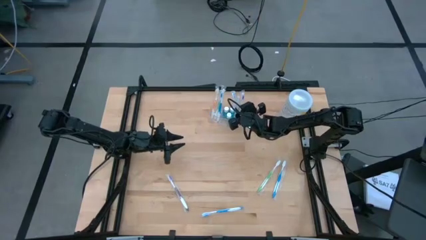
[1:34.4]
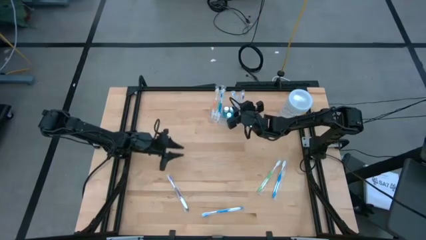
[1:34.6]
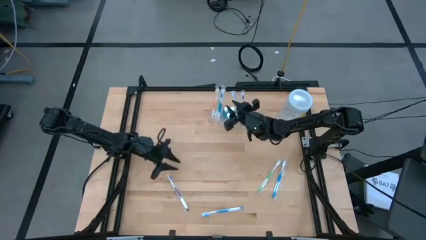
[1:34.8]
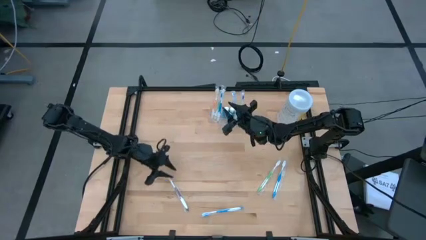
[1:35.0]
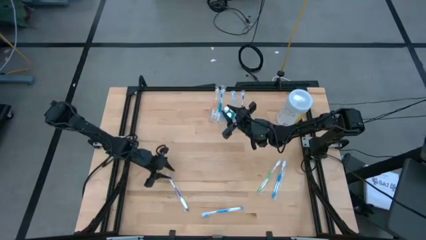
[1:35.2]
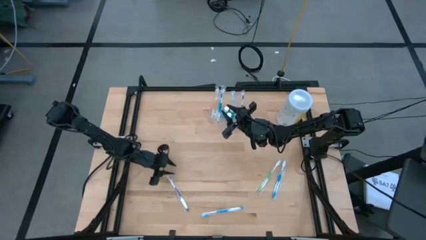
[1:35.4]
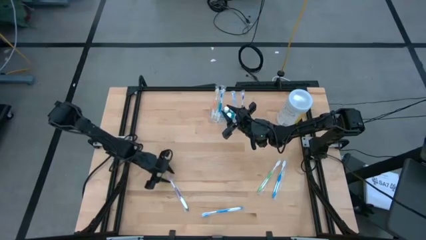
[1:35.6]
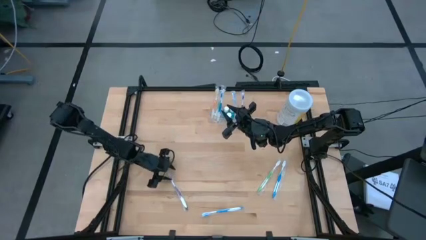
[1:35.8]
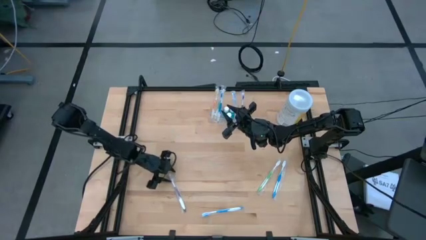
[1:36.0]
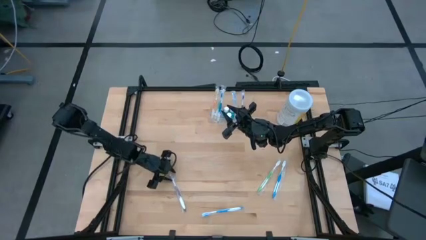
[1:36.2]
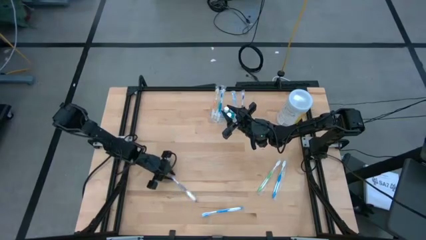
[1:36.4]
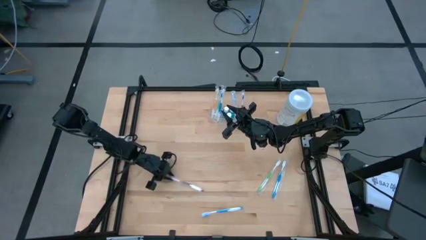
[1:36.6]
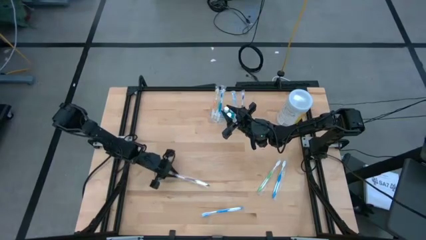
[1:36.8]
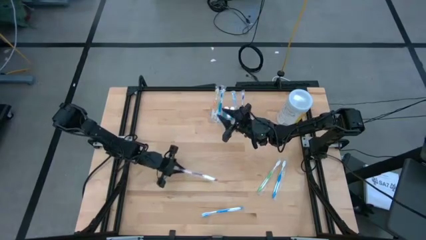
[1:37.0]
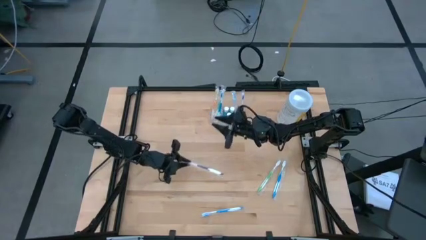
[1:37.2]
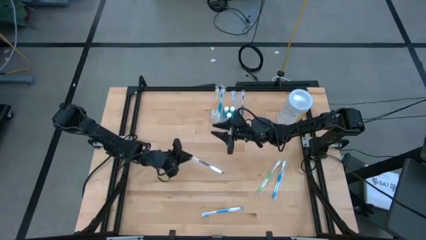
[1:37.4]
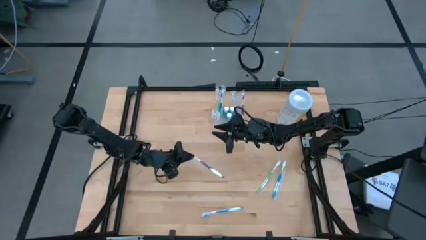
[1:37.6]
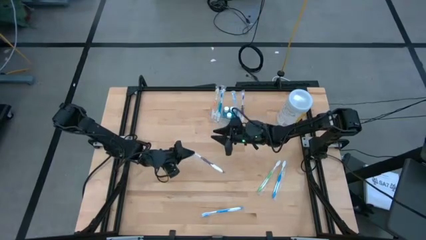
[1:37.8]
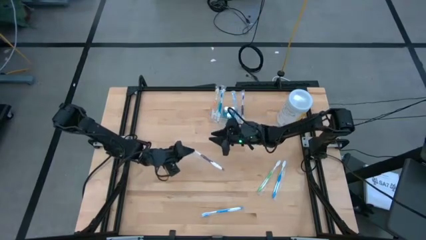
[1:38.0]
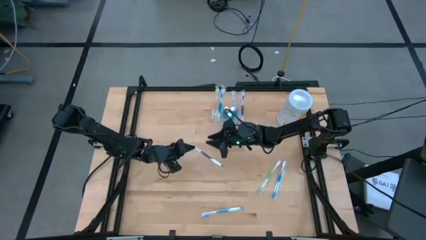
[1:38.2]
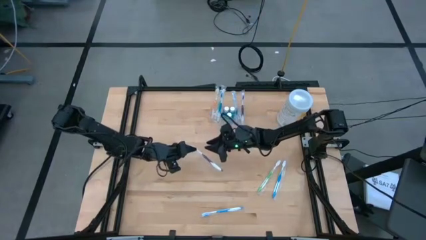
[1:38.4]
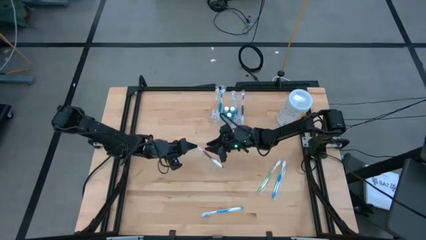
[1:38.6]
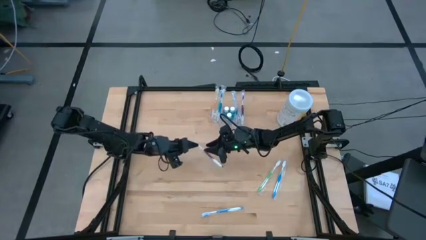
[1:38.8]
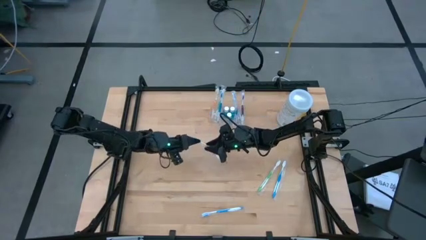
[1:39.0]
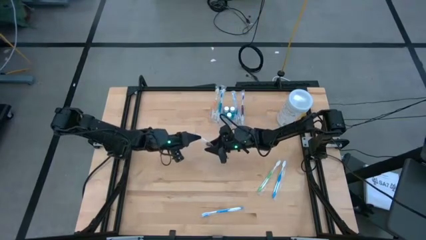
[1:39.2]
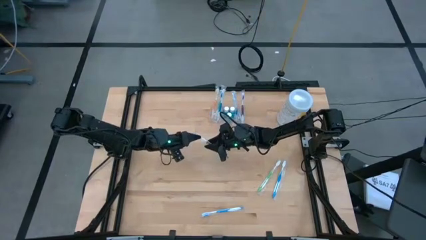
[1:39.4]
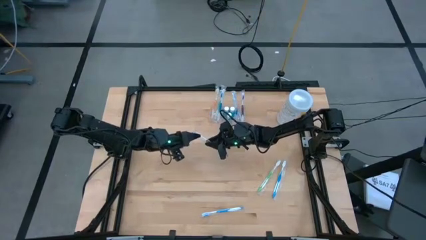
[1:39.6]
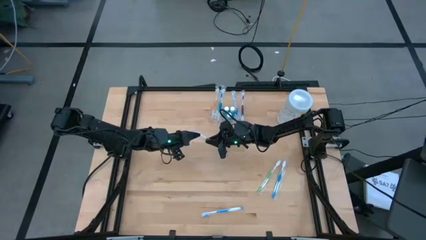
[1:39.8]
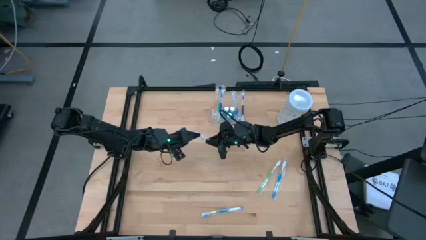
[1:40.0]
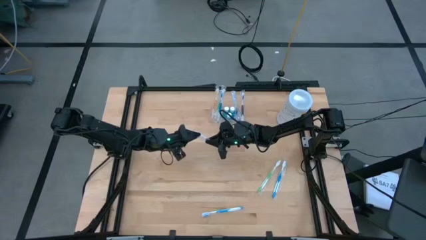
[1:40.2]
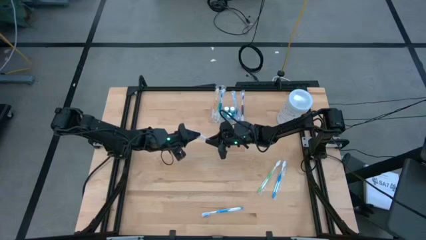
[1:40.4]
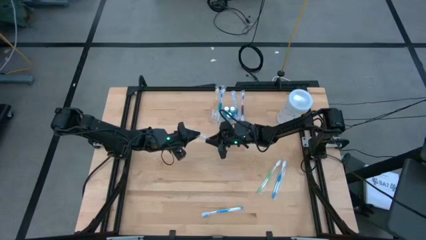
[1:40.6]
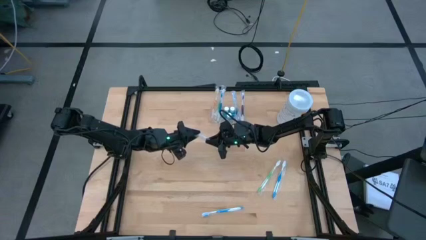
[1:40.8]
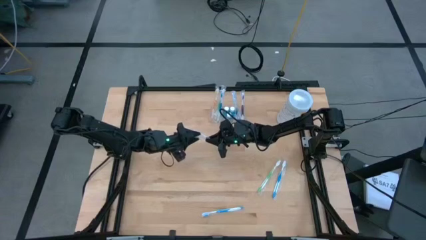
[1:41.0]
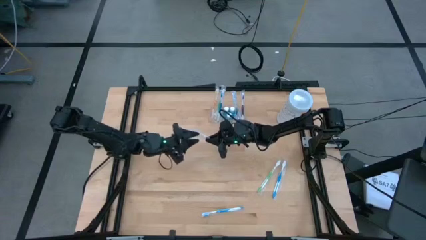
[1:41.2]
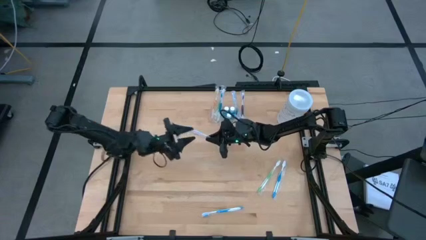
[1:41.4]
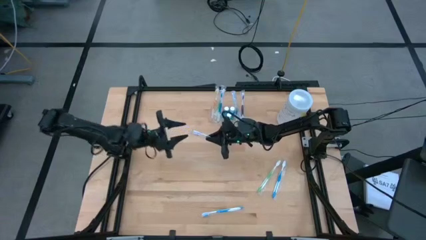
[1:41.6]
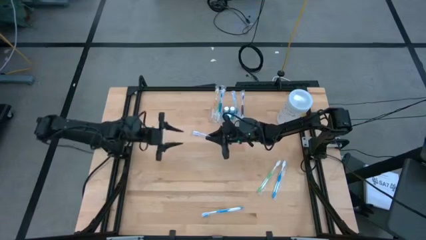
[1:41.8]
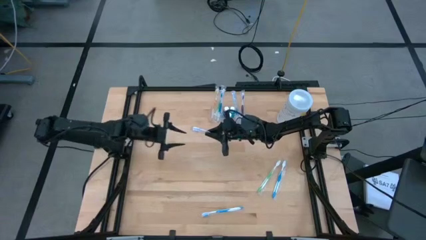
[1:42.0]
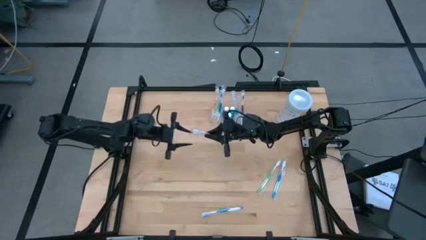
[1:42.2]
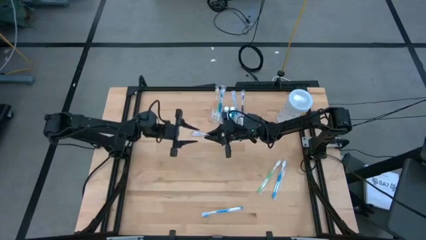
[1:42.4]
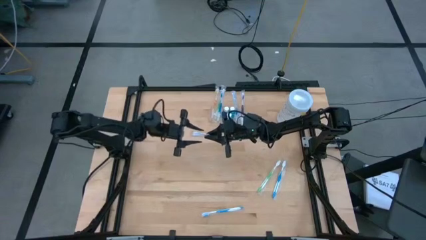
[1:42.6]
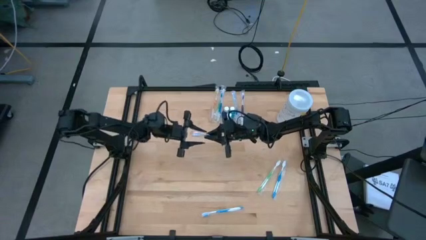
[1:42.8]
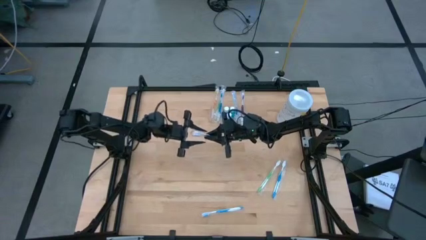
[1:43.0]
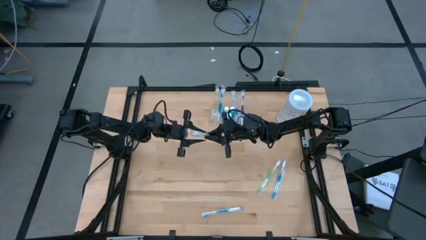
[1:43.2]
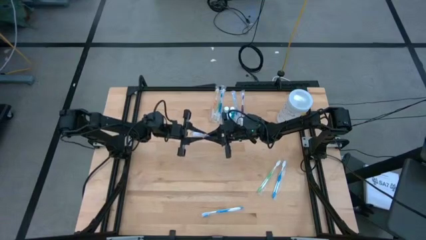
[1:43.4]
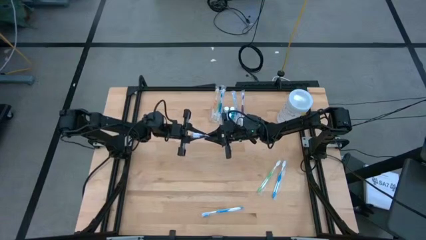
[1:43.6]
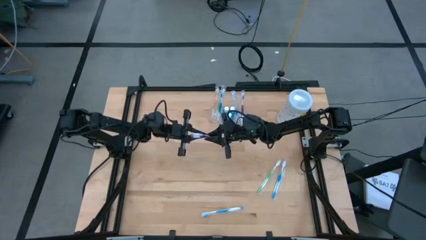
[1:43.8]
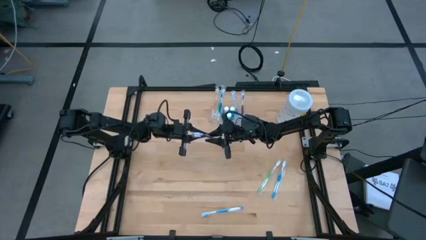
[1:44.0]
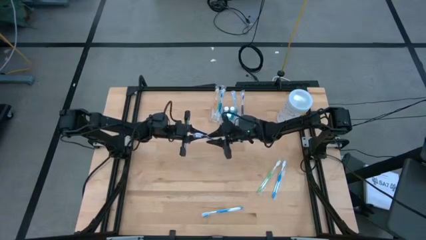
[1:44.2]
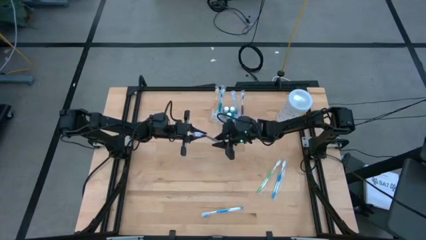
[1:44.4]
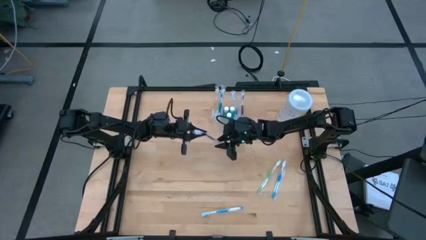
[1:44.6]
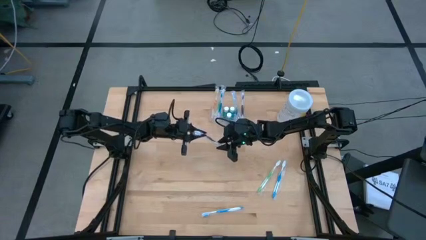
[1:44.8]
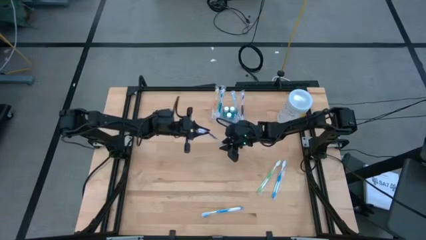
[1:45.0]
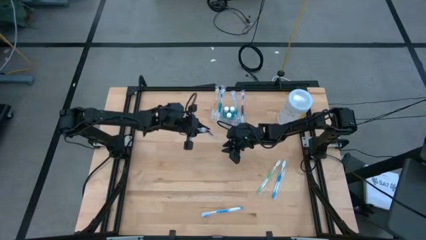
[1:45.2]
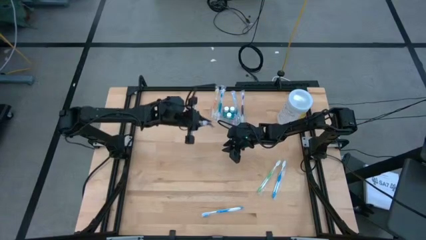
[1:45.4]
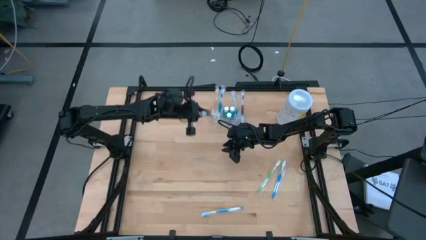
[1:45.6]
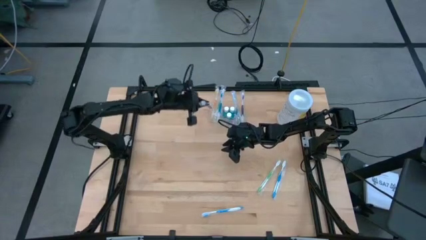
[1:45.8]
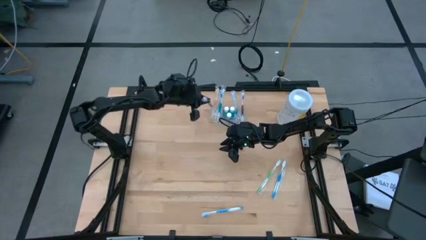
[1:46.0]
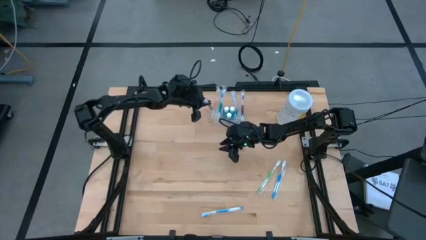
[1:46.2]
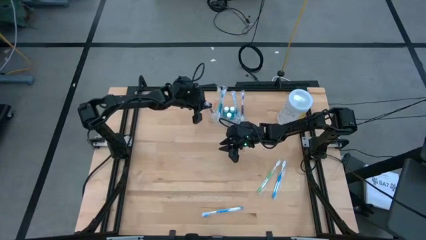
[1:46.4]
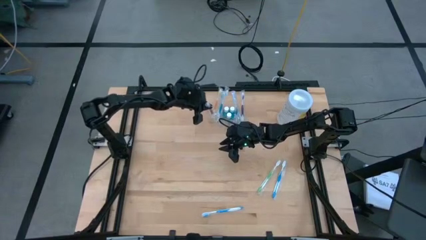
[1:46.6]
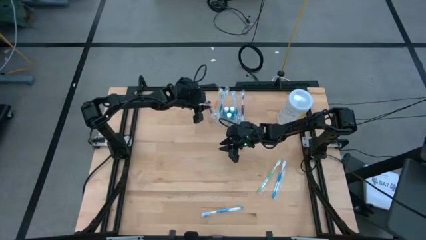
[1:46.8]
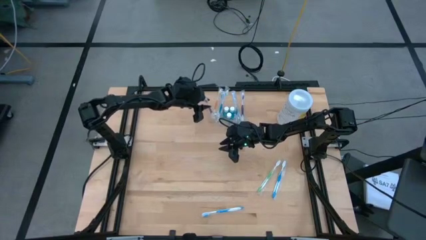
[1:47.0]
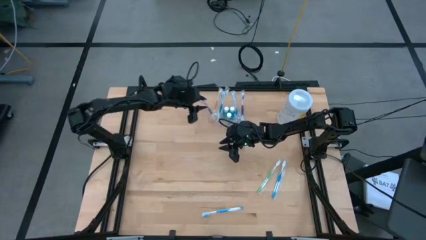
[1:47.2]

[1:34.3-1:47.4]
Task: Pick & Place toothbrushing station
Put the purple toothbrush into the left section of the transparent organizer
